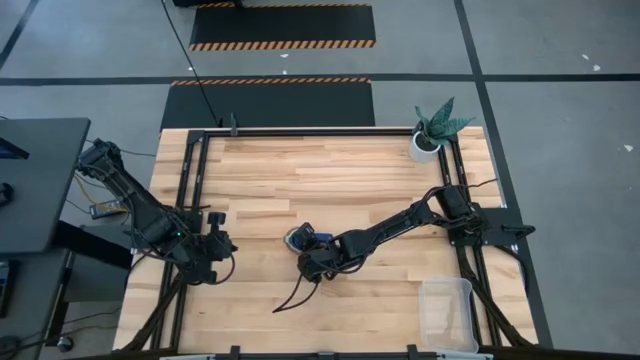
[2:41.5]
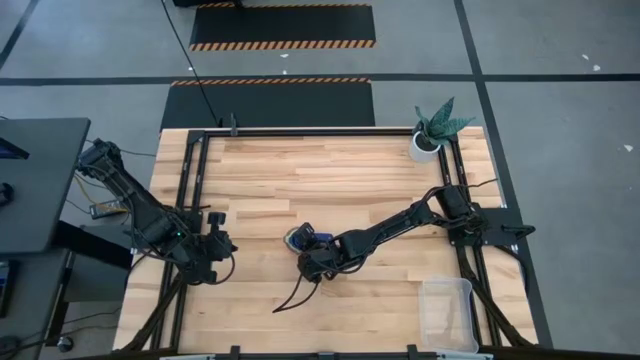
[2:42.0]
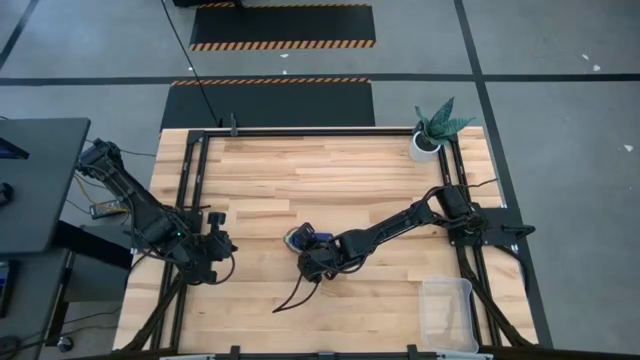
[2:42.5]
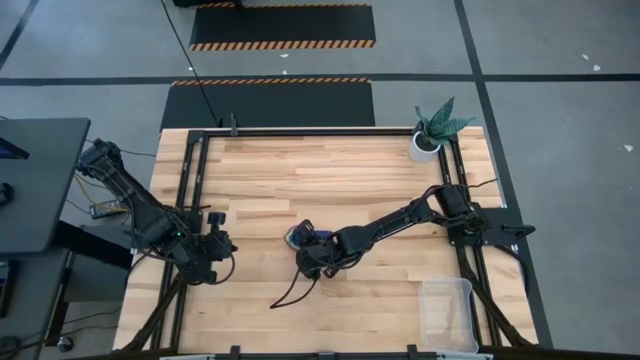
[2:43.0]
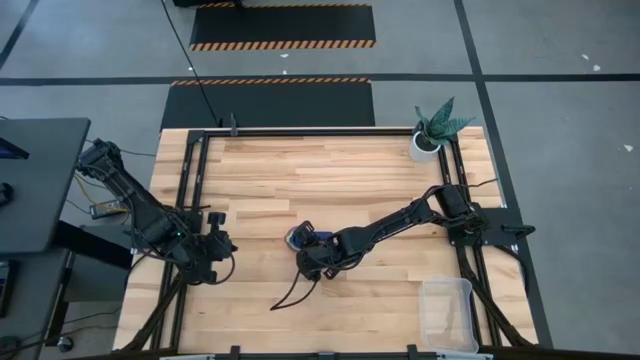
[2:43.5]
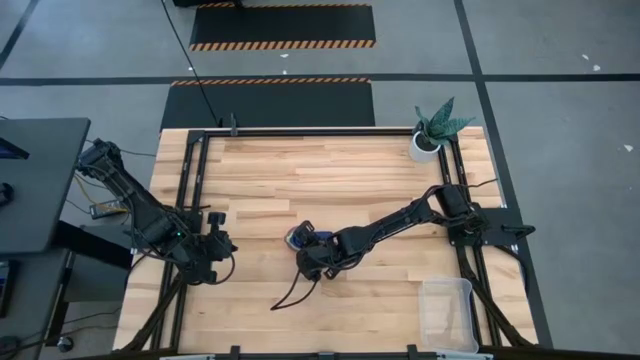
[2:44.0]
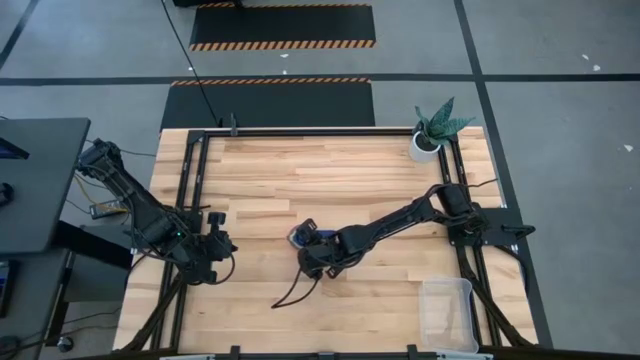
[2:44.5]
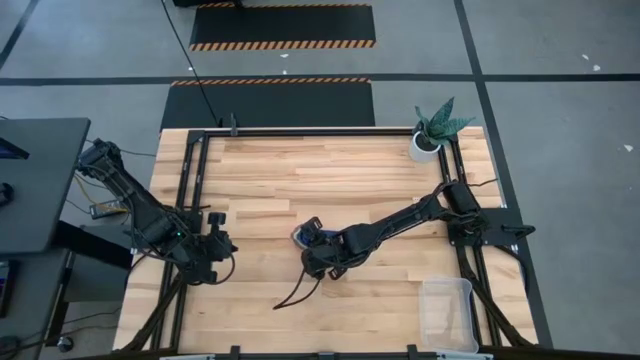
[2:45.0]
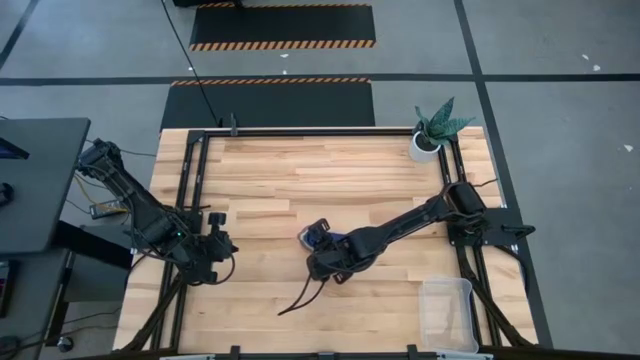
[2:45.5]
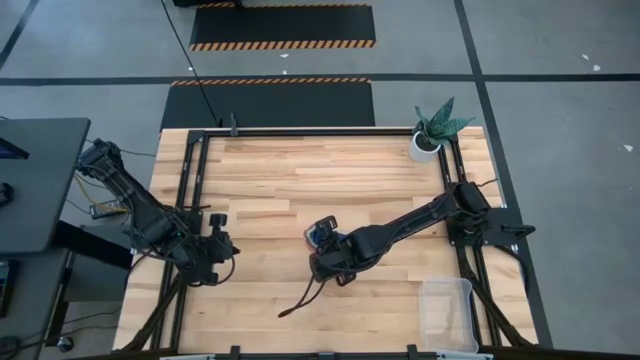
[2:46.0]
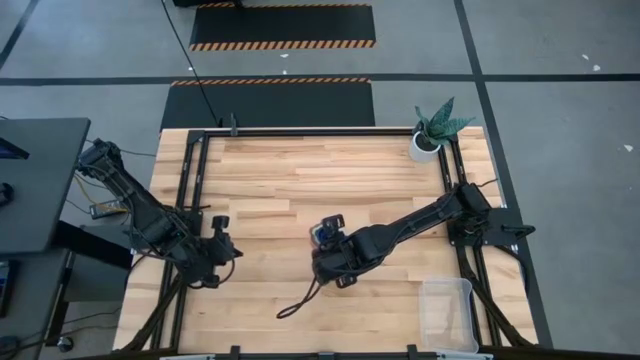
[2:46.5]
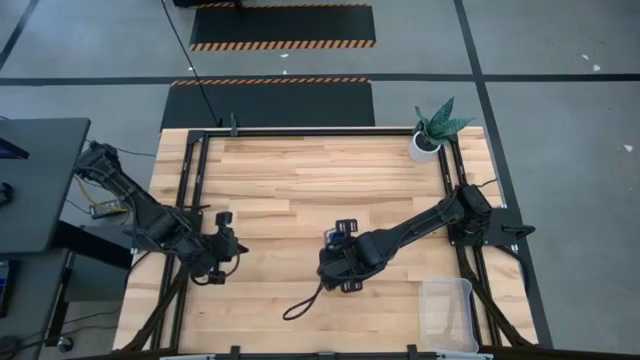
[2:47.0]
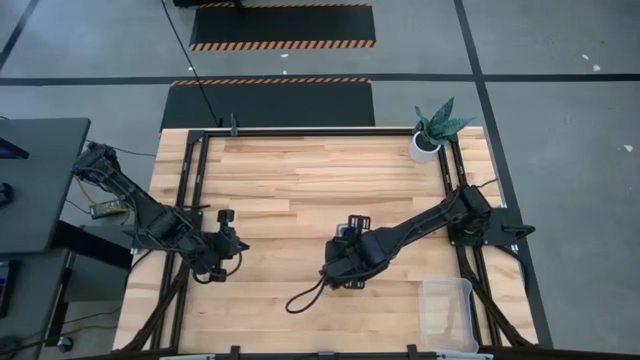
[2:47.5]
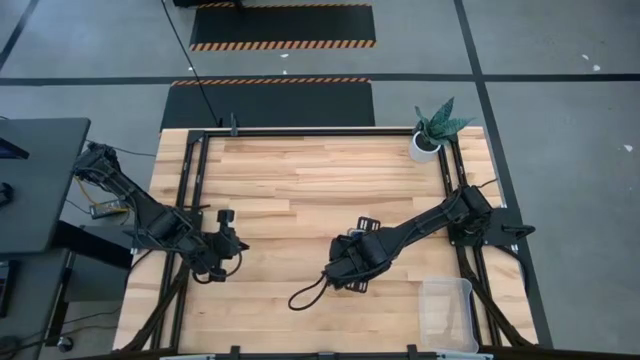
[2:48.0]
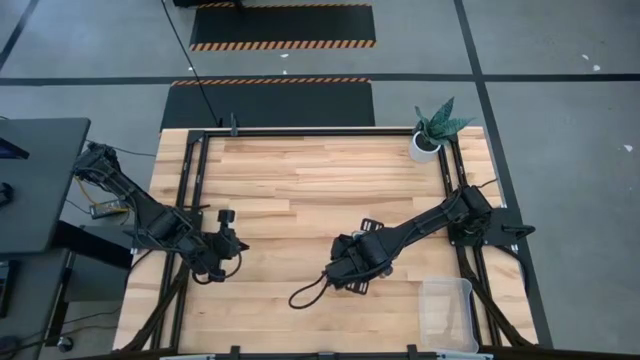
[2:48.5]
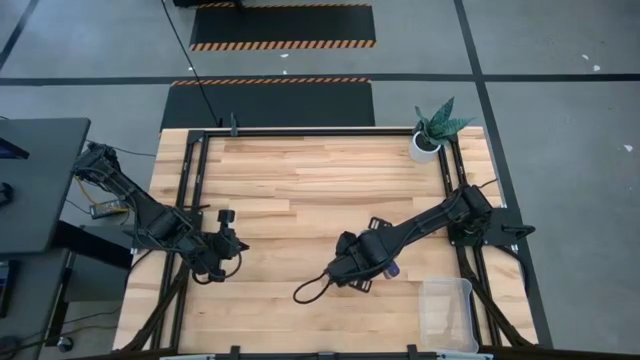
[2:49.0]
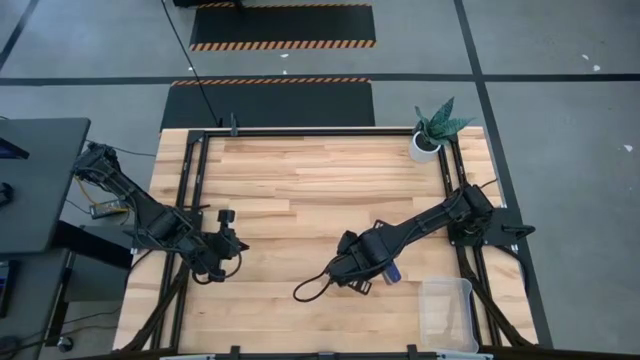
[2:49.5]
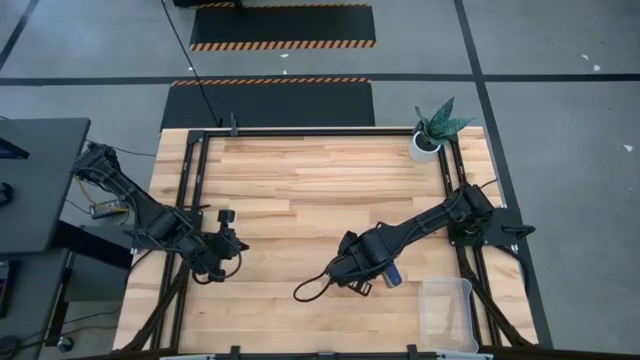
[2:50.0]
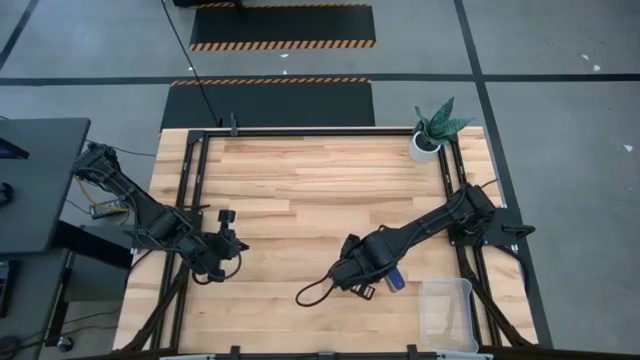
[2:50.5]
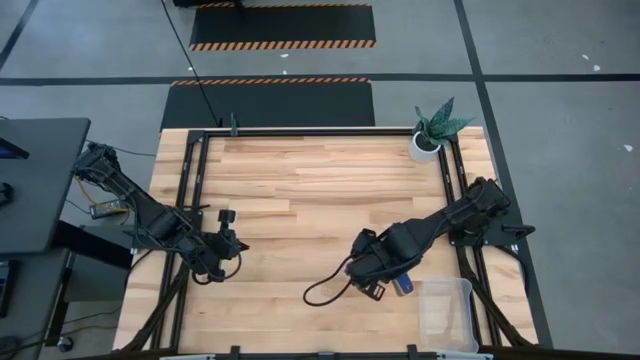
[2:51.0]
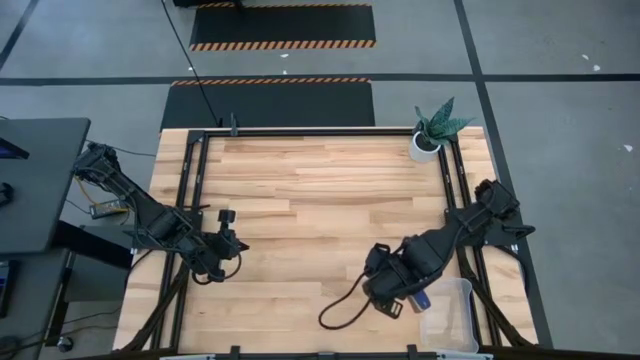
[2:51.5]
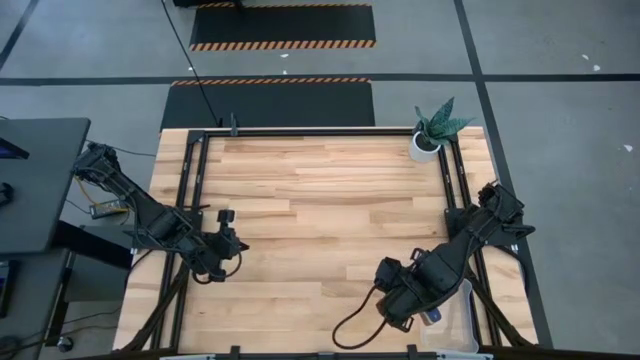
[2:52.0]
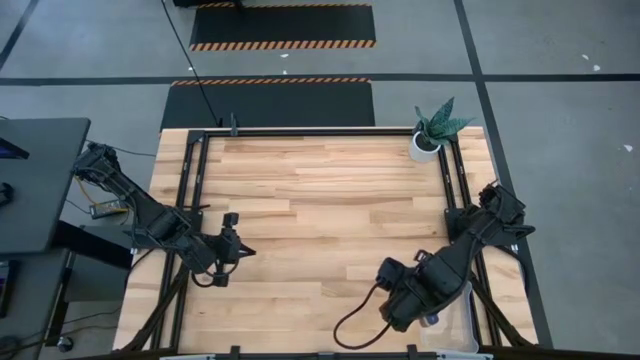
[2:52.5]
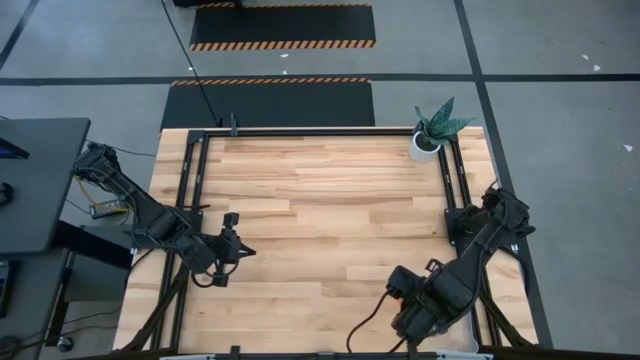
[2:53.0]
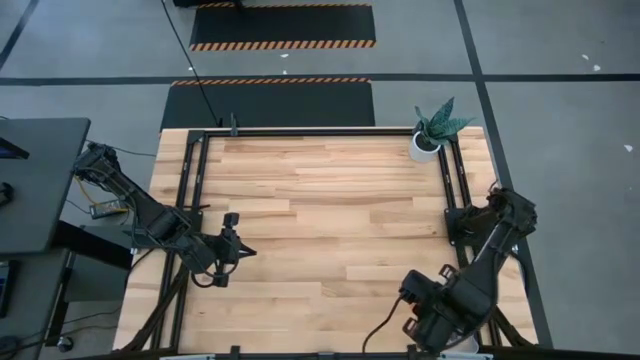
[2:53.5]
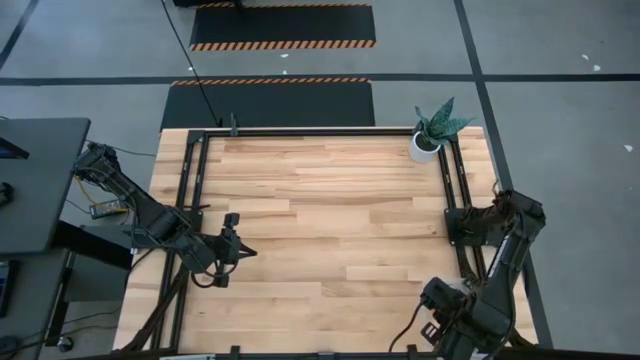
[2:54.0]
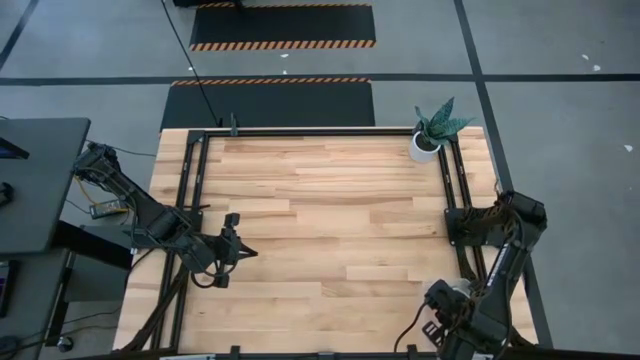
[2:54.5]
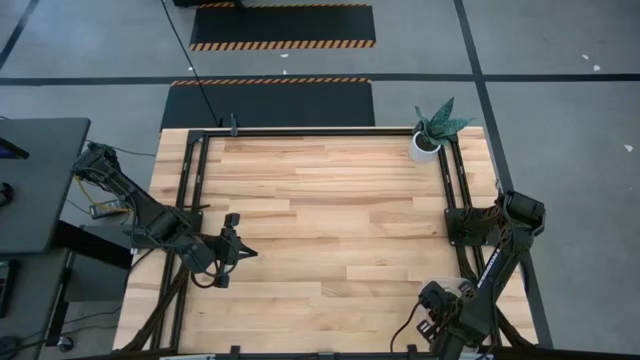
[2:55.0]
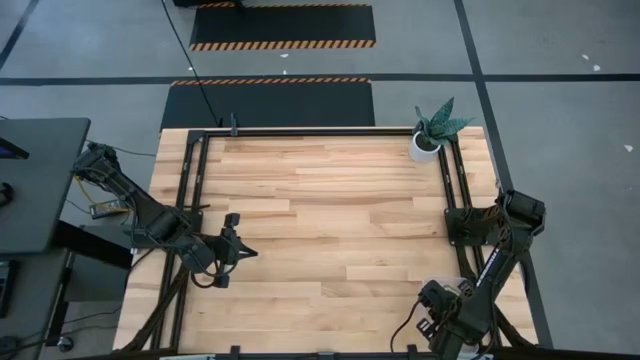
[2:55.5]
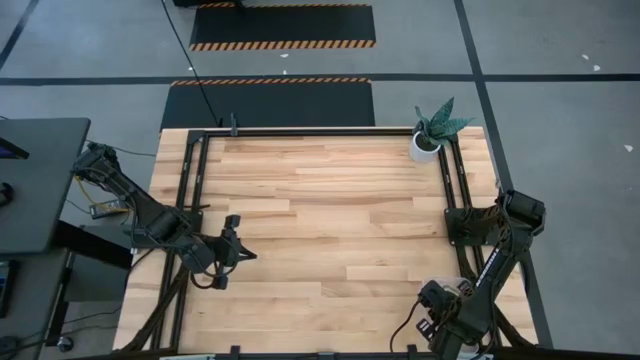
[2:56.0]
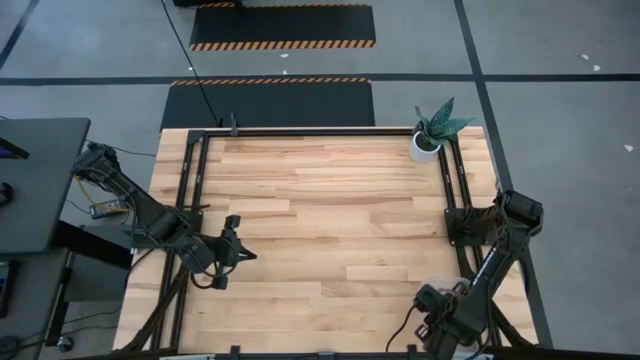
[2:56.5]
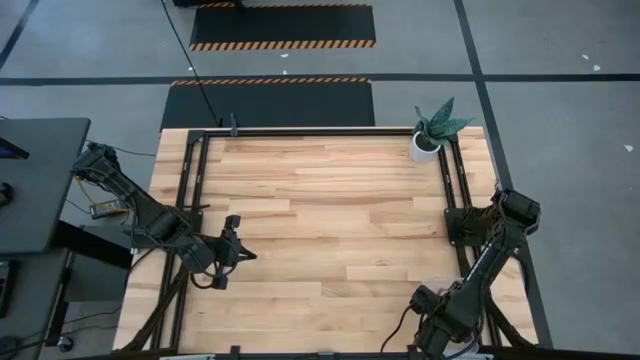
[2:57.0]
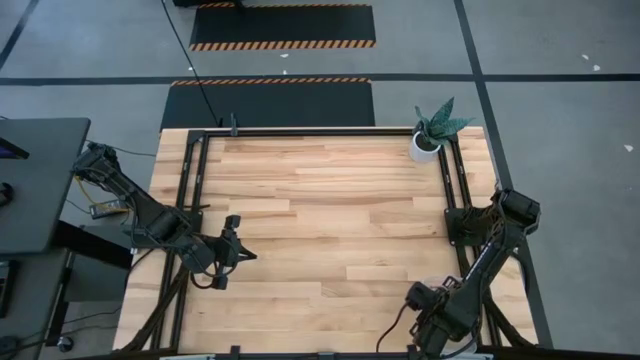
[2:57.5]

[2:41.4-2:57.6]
Task: Nest measuring cups in basket
Put the nested measuring cups into the transparent bin

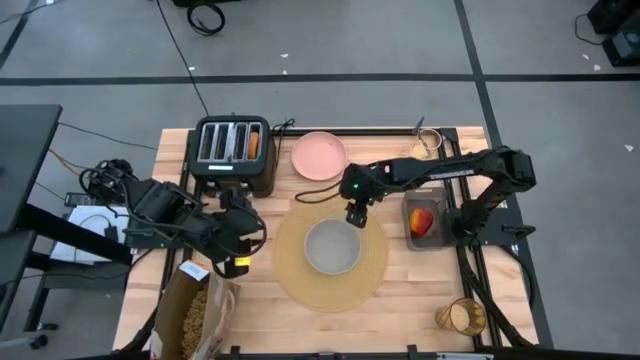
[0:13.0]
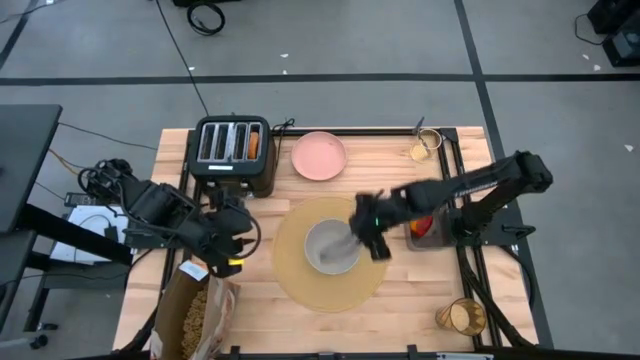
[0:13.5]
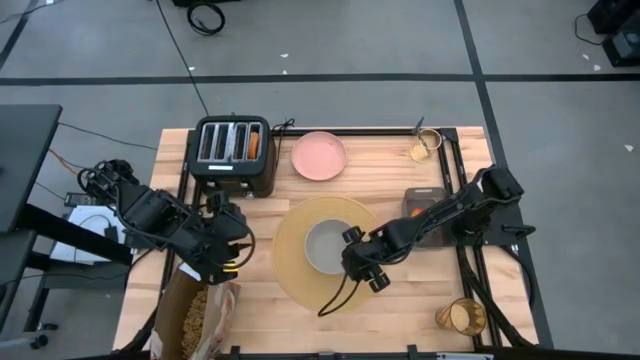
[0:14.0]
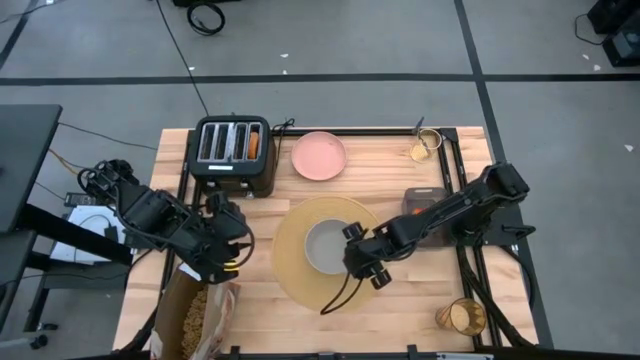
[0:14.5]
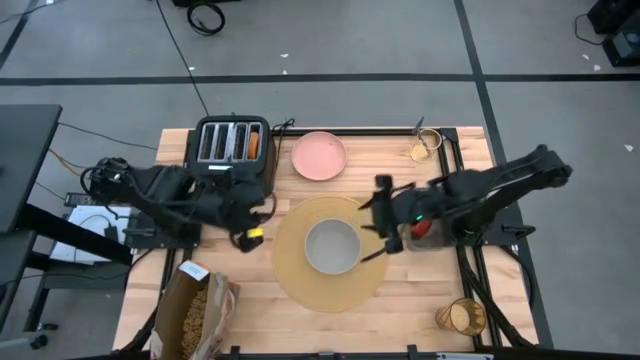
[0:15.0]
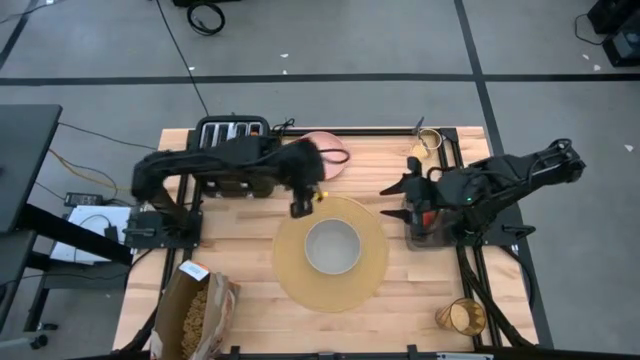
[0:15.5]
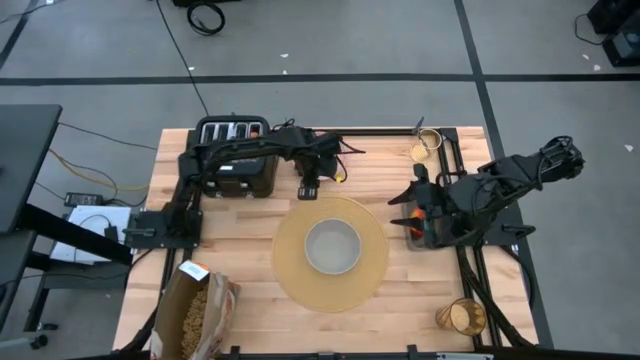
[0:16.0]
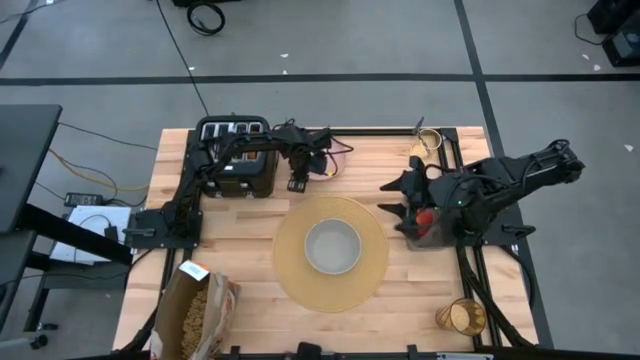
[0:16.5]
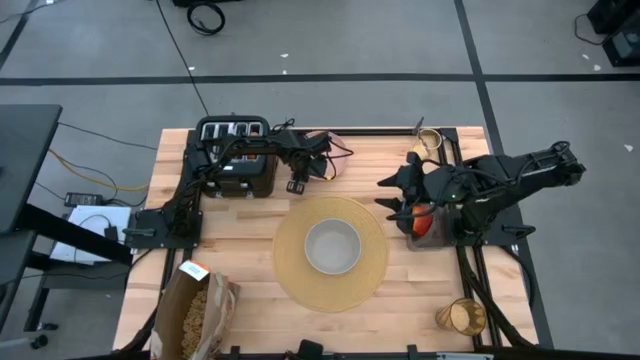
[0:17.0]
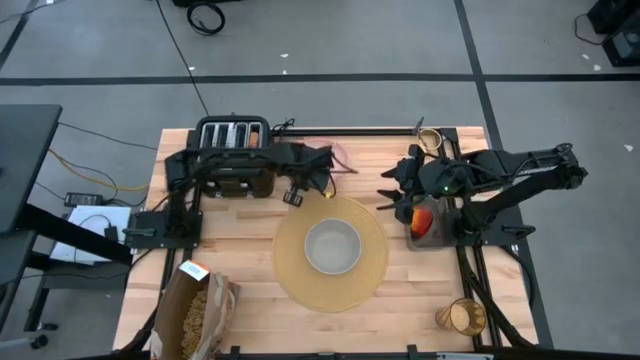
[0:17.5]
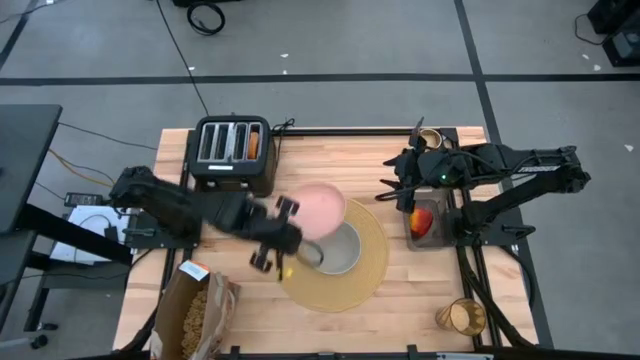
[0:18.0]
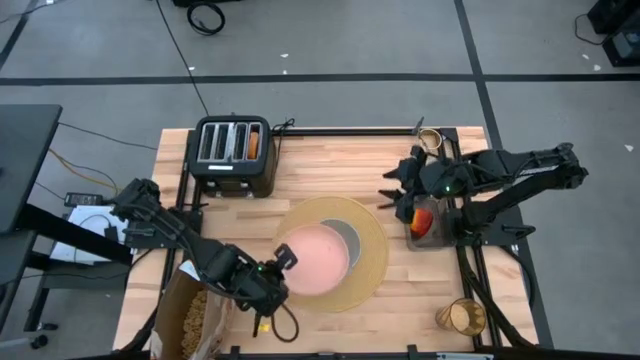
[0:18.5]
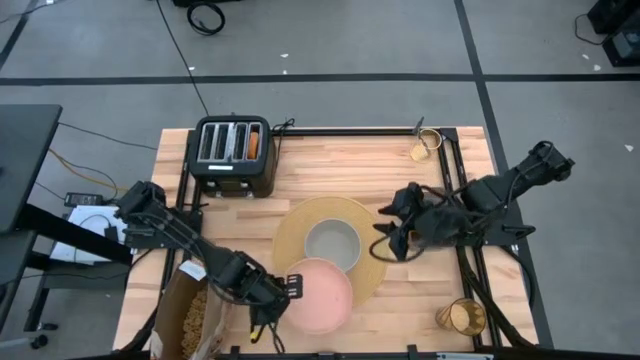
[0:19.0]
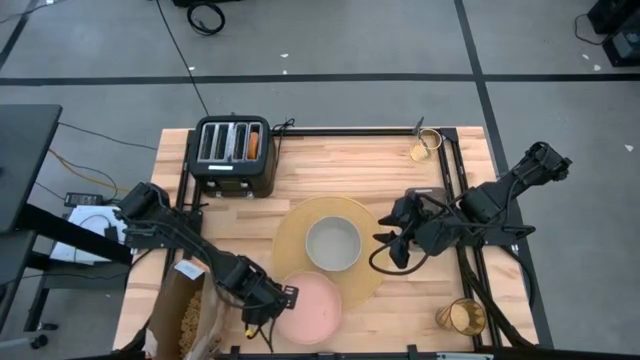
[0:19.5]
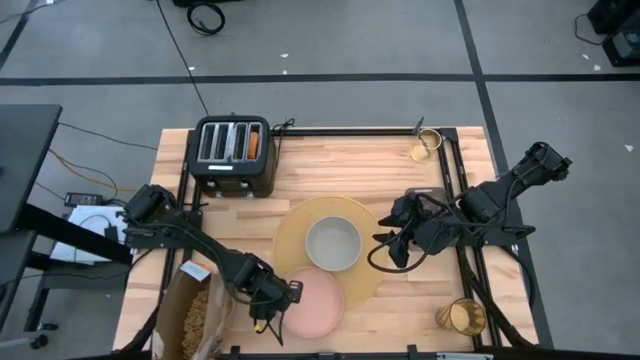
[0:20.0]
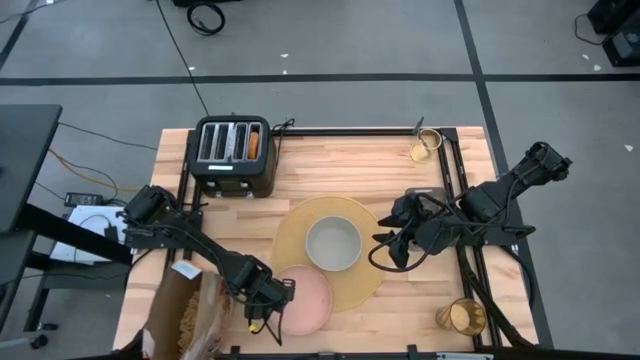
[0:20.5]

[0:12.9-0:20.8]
Task: Arrange a breakfast setting
Put the light orange plate on the bottom left of the yellow placemat
